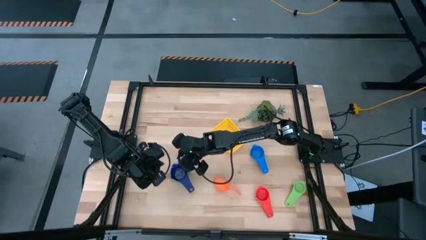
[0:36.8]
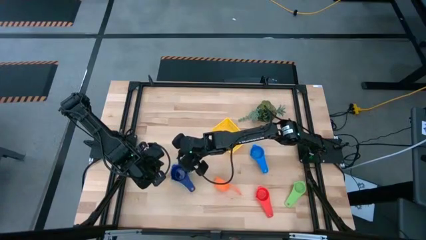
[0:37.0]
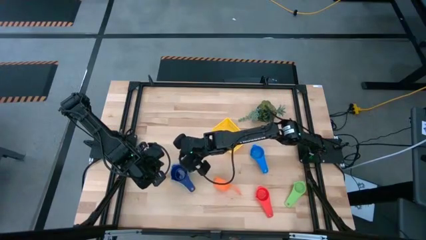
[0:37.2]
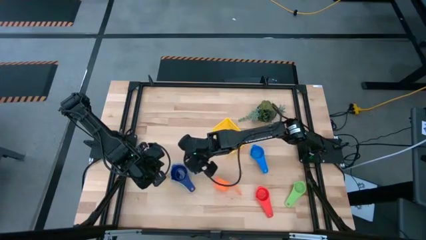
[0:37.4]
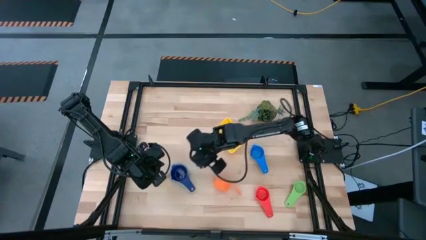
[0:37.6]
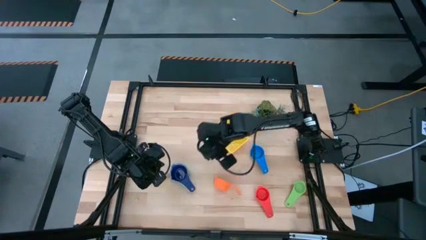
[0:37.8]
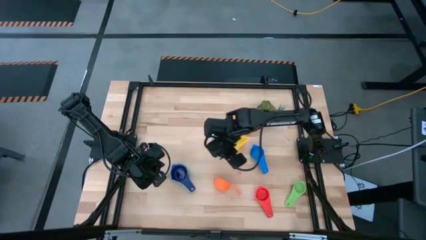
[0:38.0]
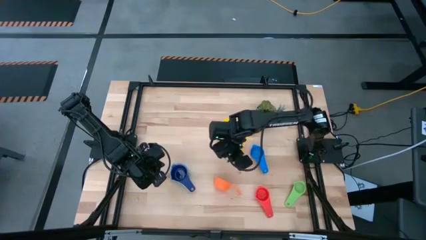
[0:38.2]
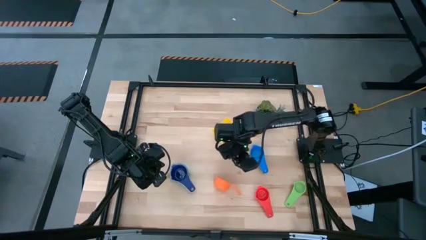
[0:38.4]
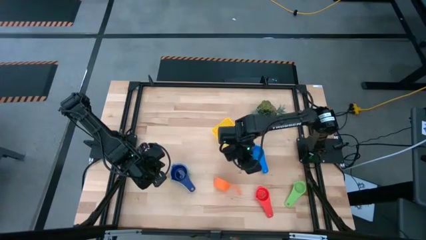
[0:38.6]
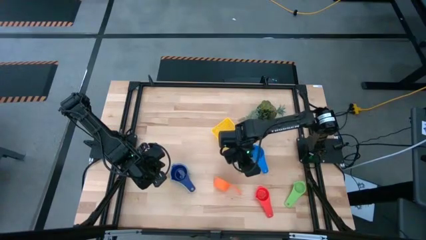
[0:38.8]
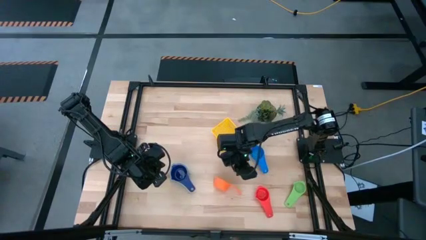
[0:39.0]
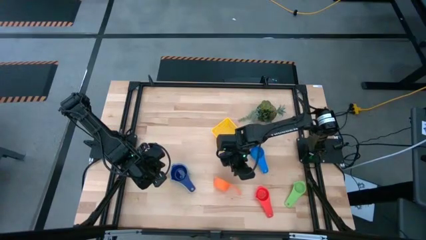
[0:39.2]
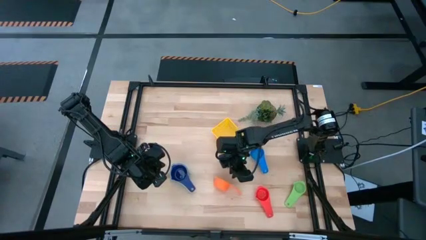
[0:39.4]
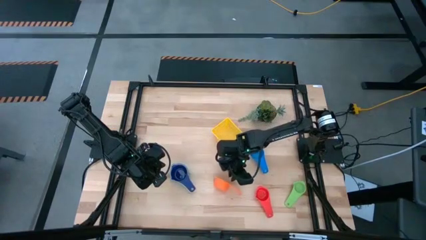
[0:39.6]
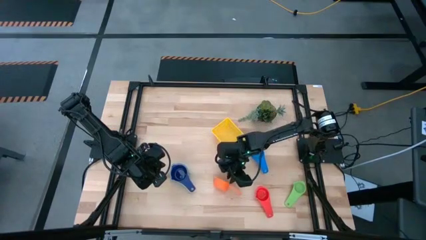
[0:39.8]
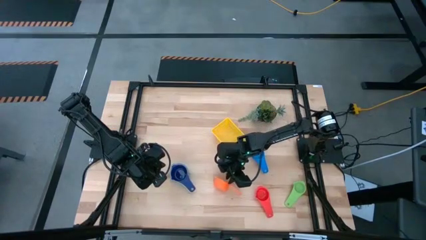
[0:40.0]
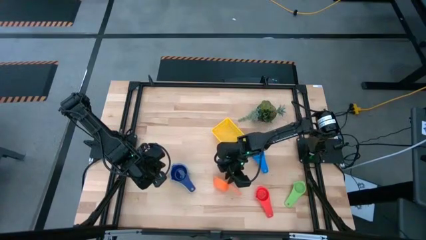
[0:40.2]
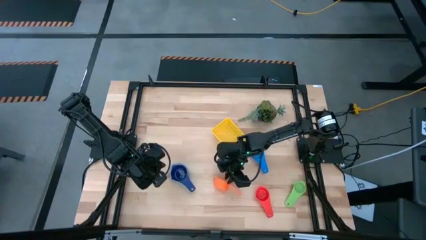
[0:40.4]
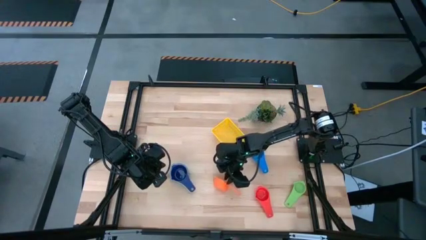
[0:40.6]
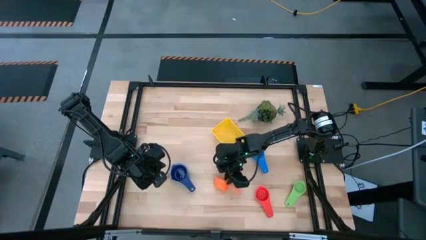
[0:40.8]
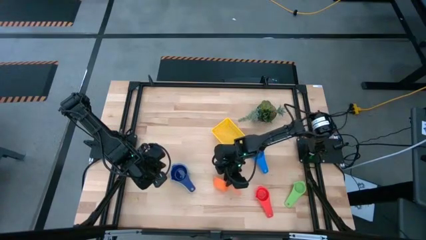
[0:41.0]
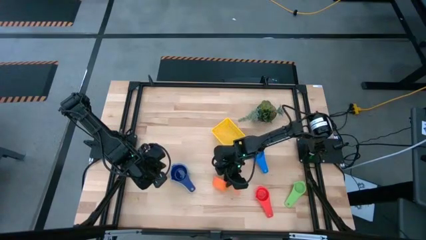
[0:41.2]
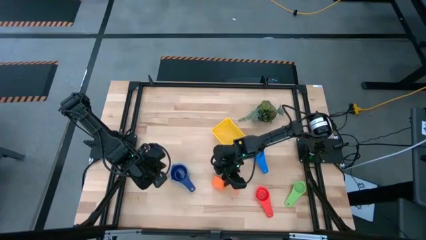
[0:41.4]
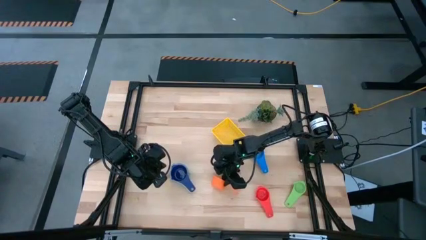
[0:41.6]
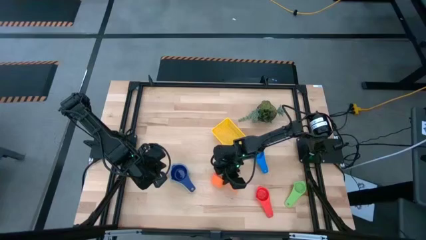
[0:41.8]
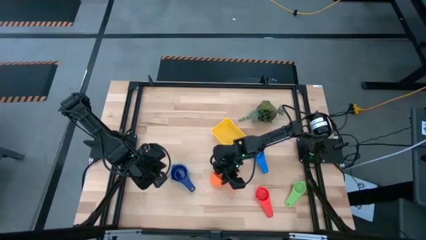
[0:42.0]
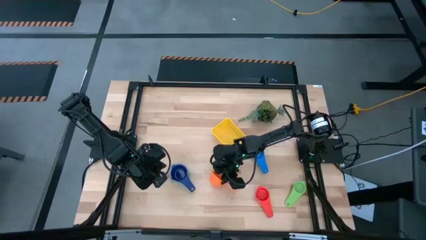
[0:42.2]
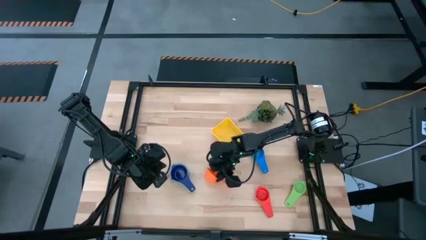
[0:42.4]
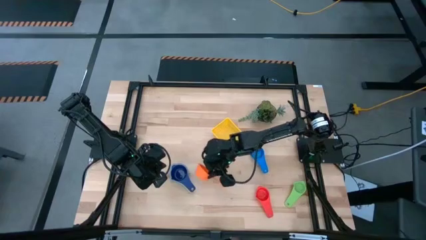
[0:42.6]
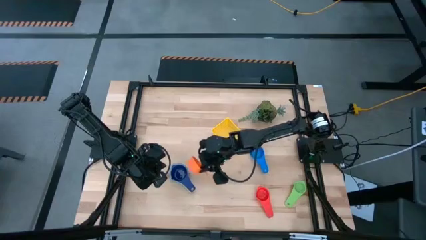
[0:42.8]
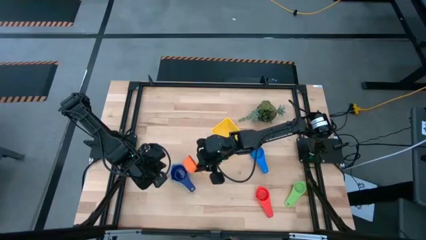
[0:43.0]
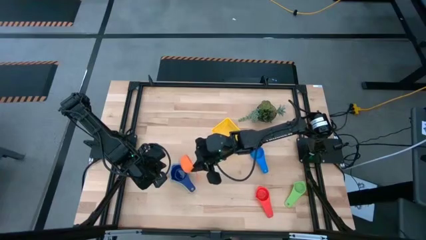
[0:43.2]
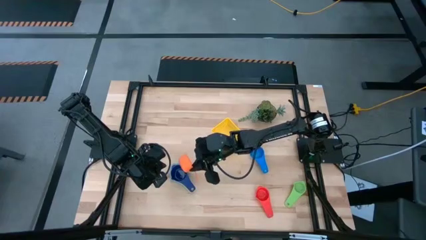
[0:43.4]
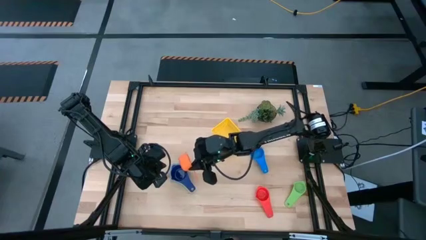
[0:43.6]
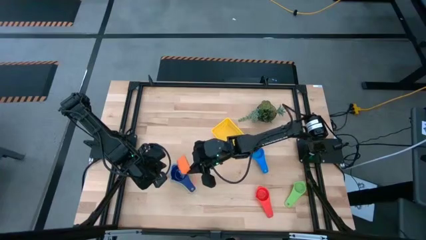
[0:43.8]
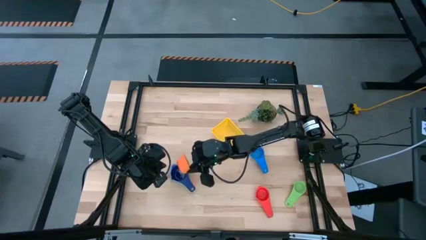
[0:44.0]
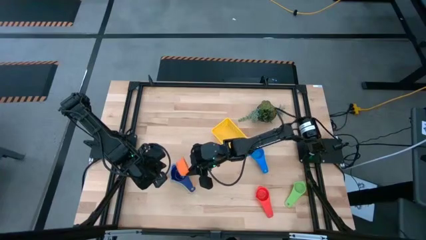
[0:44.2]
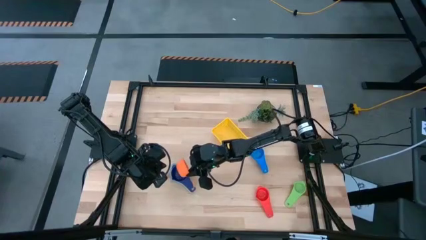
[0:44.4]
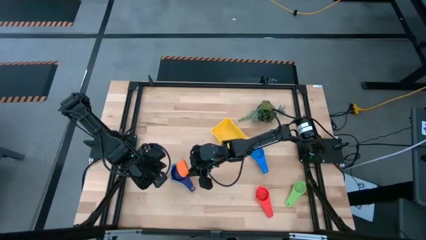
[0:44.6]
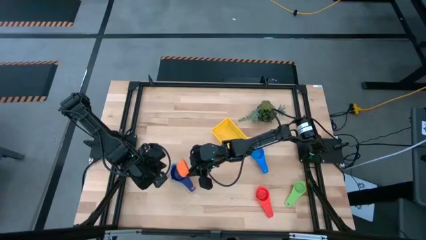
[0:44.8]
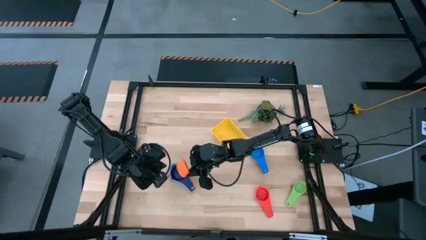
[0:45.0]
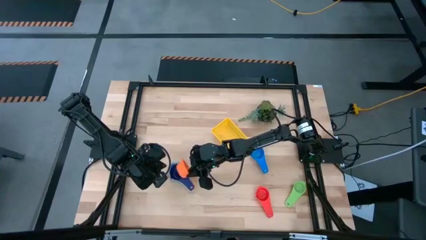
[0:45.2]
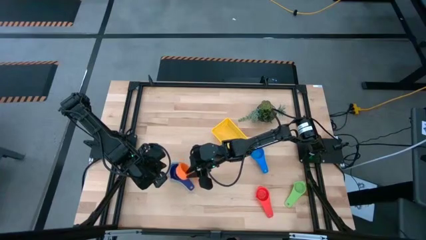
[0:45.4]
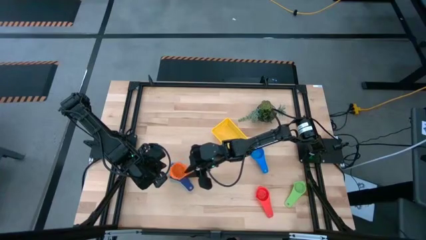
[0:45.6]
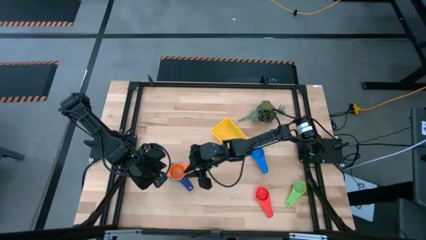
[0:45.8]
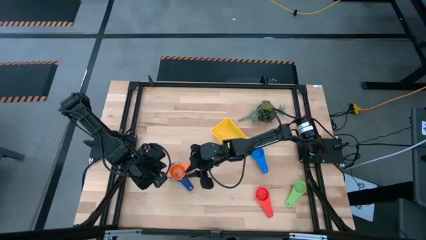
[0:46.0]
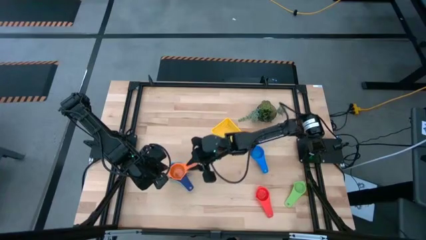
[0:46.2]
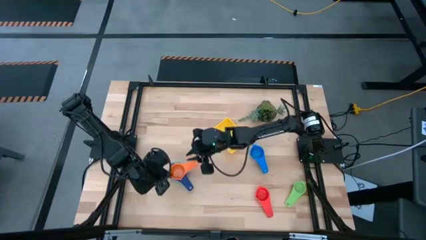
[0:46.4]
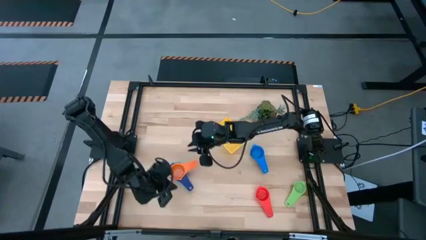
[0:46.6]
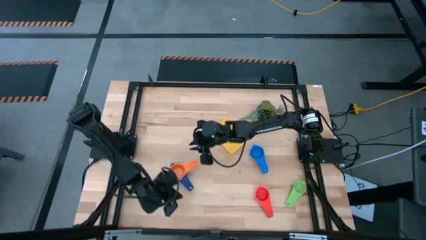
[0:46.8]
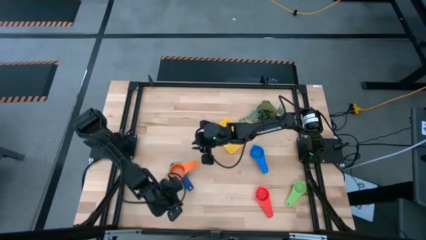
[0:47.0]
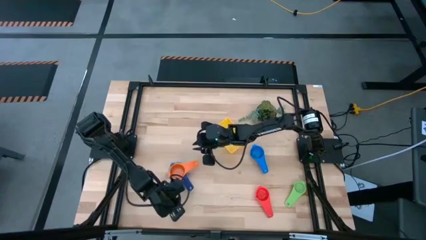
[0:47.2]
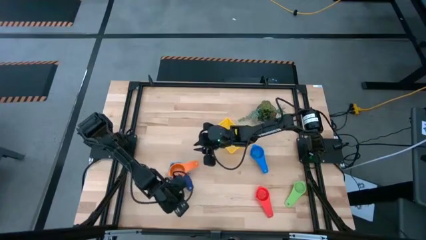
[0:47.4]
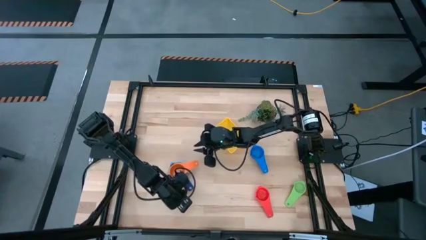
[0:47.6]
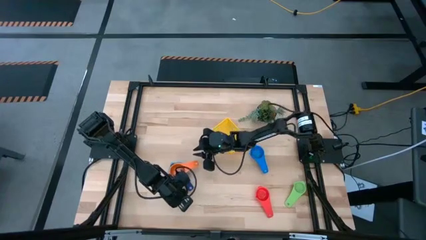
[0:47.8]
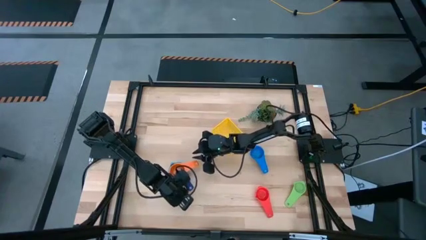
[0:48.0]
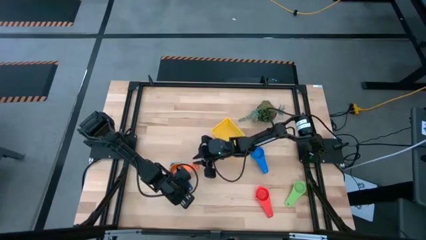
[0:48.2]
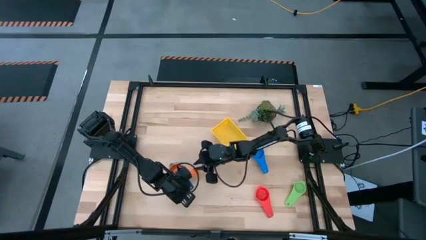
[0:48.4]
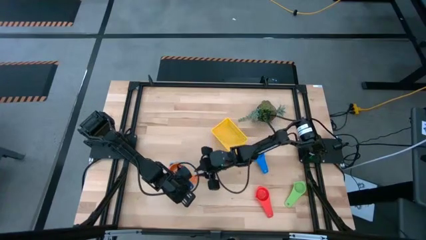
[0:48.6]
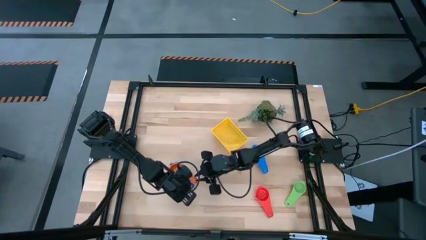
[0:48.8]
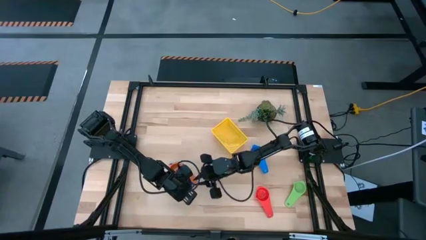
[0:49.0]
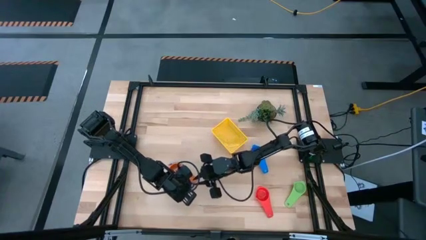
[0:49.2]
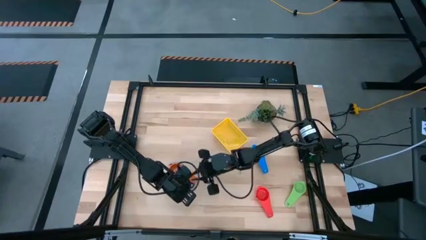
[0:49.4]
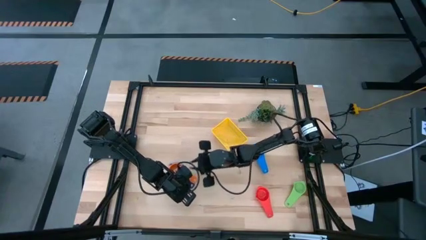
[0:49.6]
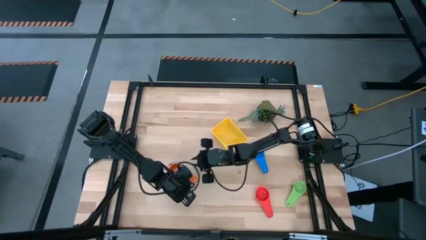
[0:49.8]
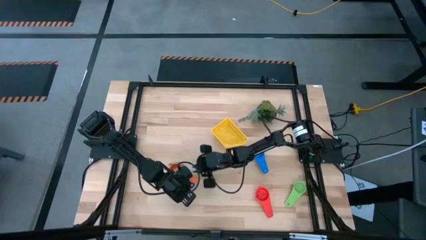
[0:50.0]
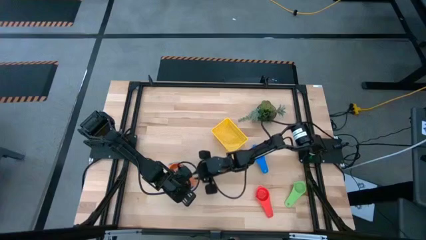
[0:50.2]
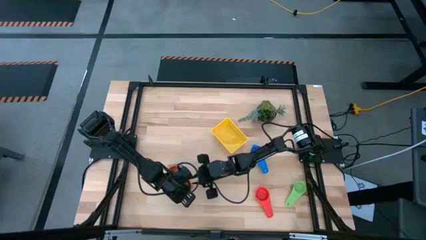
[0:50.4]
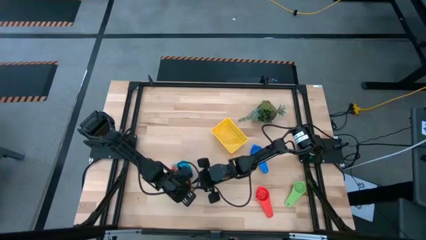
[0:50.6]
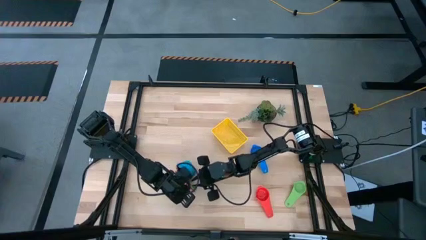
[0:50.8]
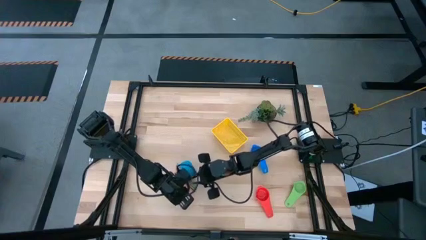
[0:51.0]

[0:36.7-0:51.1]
Task: Nest measuring cups in basket
Stack the orange measuring cup on top of the dark blue measuring cup

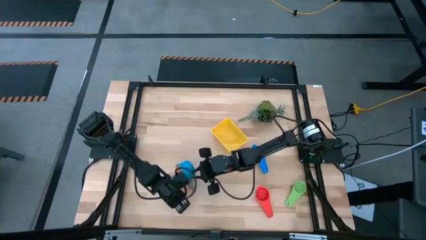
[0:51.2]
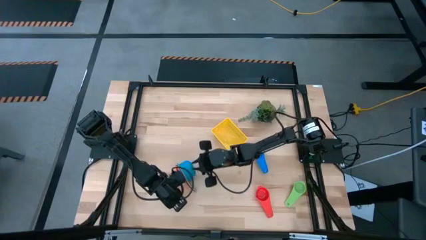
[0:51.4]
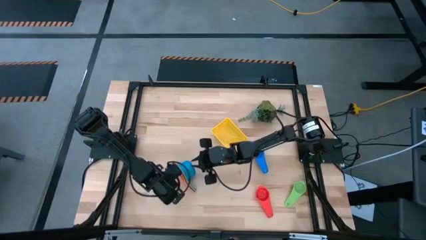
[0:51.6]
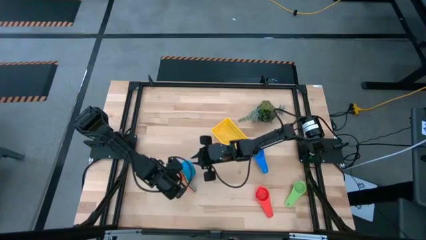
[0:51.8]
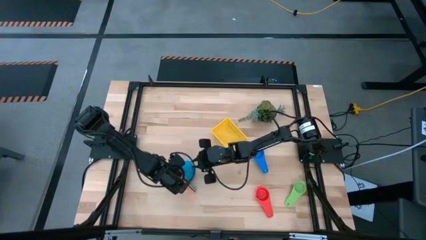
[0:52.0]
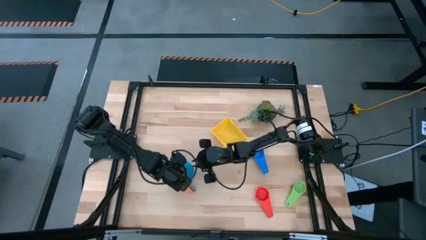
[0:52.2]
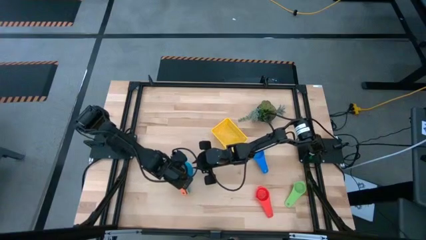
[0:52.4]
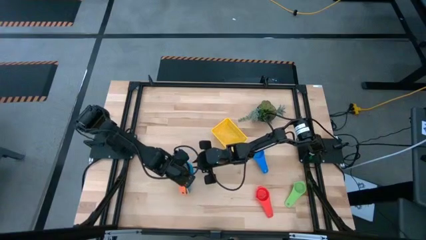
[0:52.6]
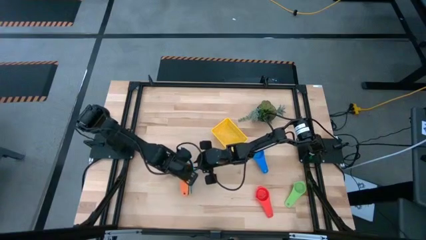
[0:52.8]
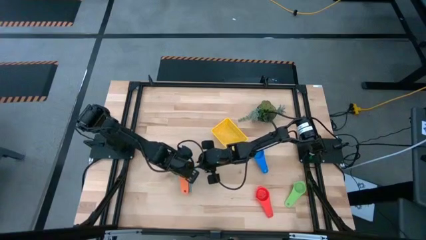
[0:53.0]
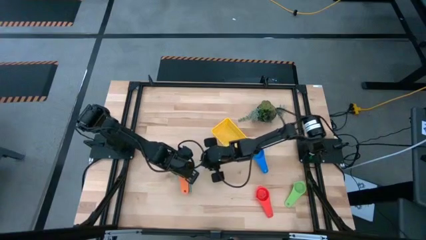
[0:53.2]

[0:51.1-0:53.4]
Adjust the stacked measuring cups
